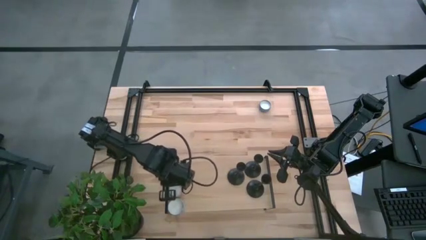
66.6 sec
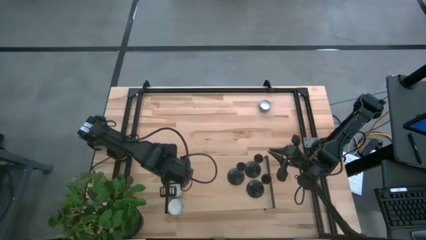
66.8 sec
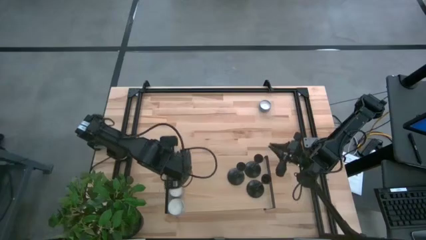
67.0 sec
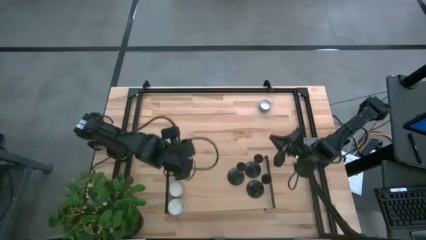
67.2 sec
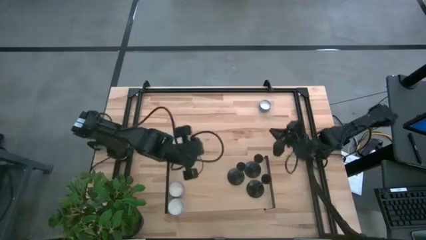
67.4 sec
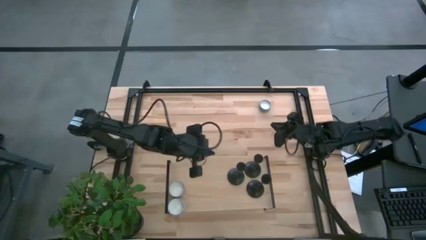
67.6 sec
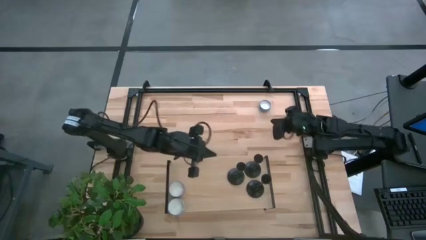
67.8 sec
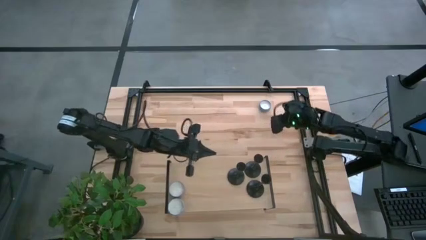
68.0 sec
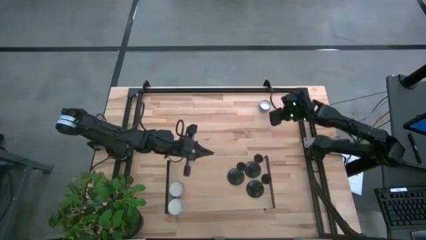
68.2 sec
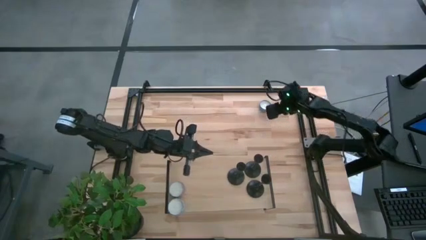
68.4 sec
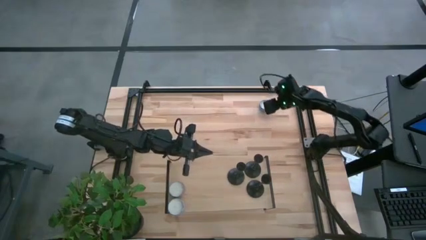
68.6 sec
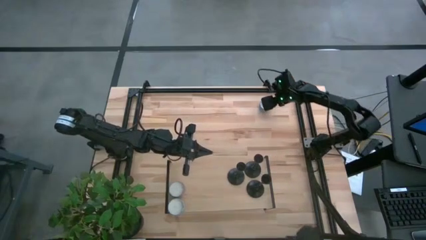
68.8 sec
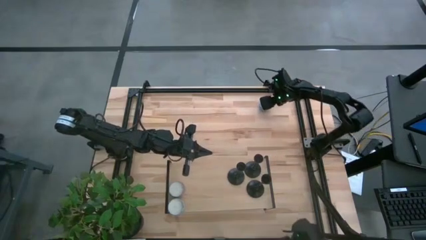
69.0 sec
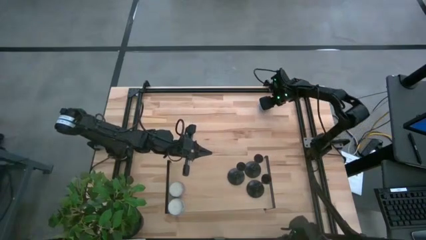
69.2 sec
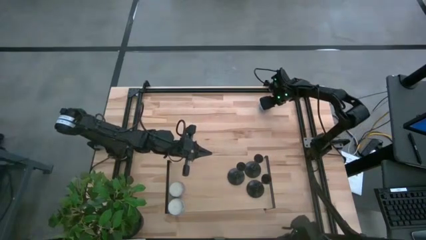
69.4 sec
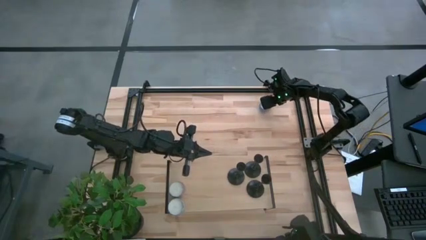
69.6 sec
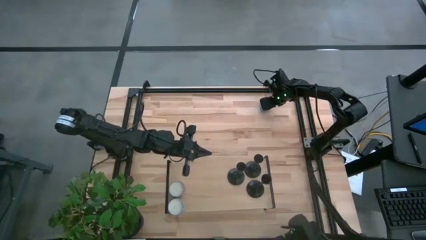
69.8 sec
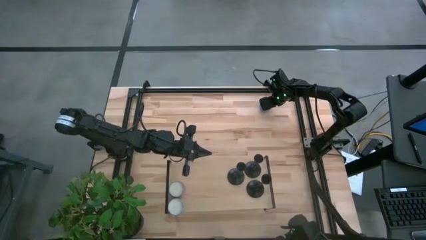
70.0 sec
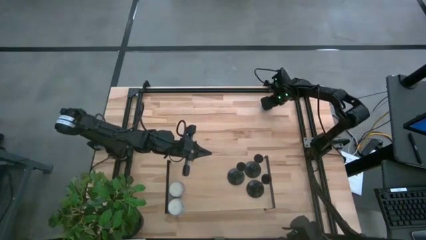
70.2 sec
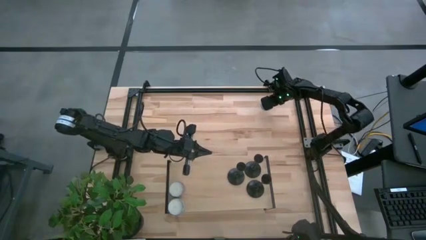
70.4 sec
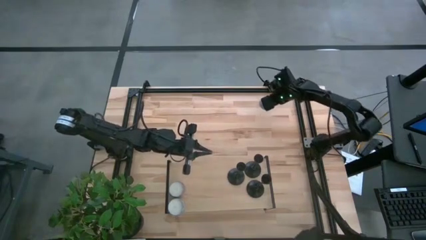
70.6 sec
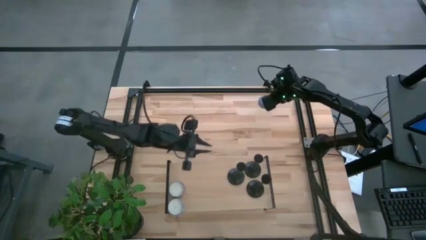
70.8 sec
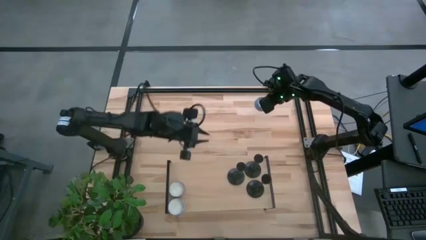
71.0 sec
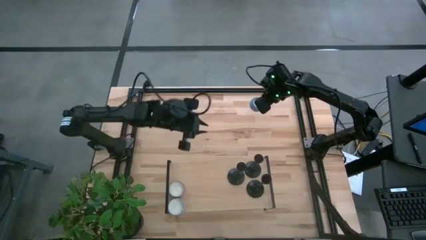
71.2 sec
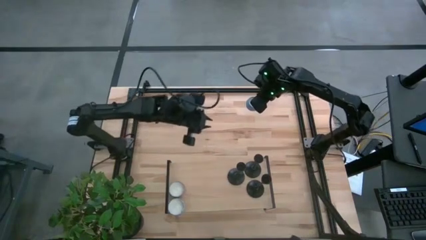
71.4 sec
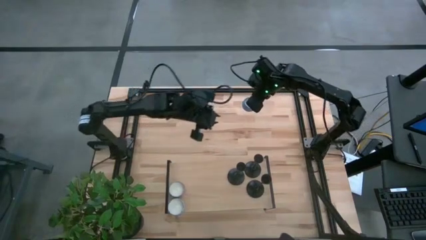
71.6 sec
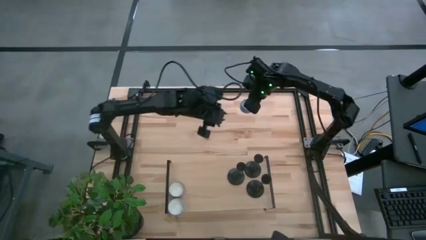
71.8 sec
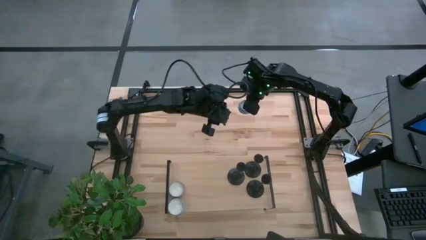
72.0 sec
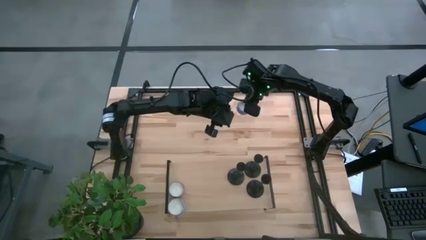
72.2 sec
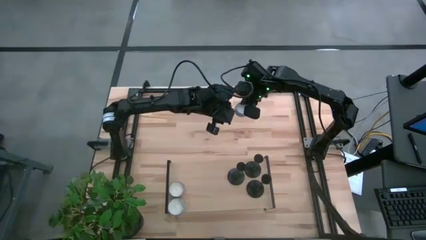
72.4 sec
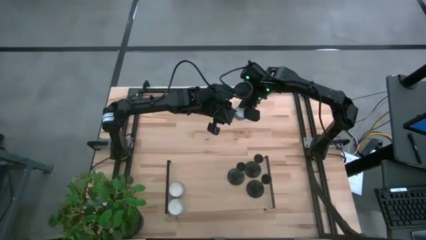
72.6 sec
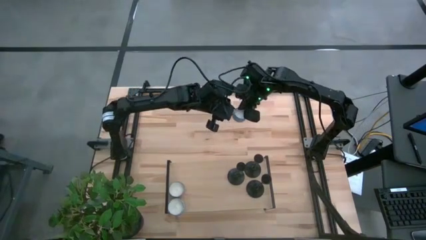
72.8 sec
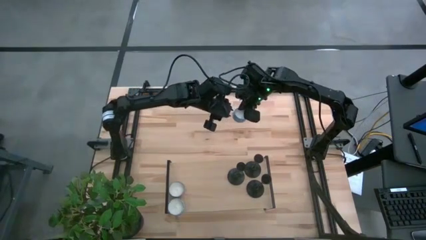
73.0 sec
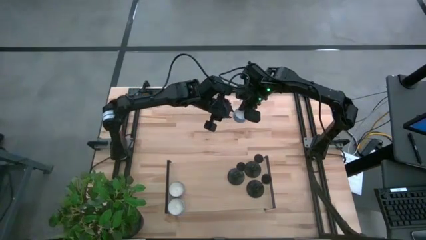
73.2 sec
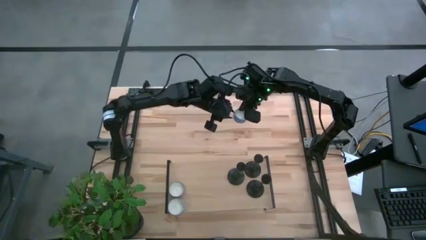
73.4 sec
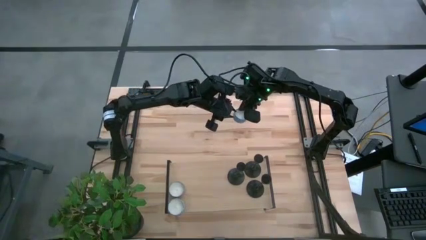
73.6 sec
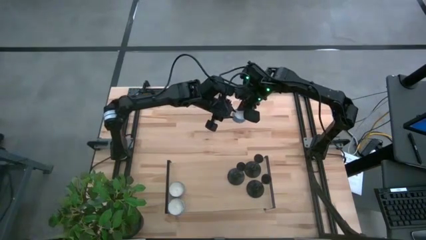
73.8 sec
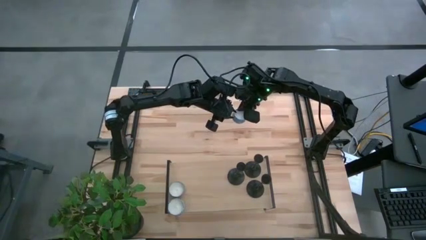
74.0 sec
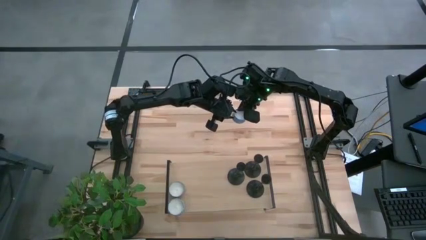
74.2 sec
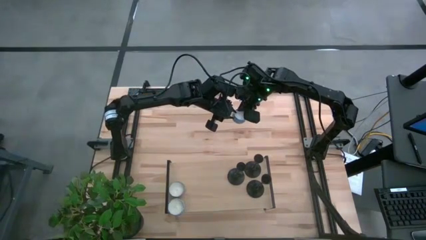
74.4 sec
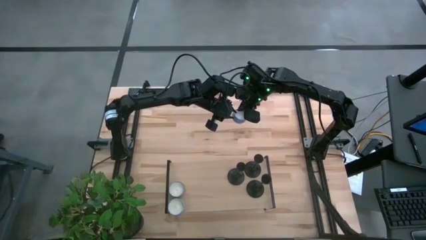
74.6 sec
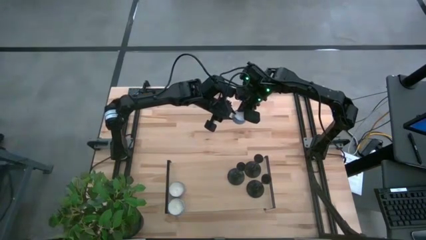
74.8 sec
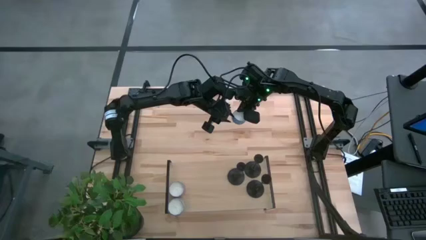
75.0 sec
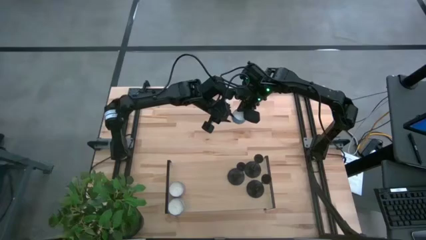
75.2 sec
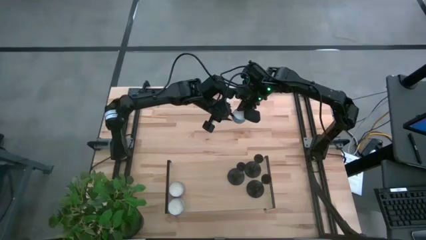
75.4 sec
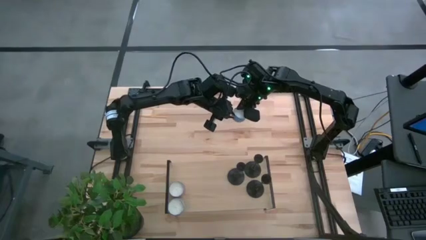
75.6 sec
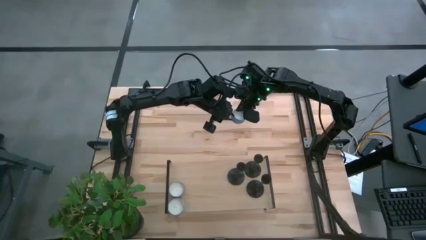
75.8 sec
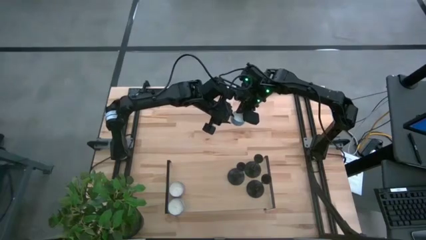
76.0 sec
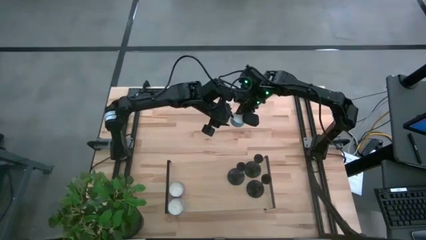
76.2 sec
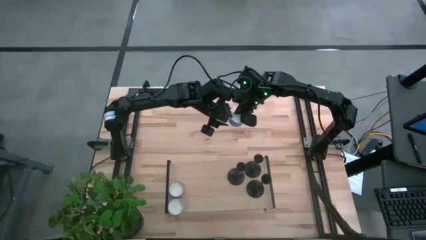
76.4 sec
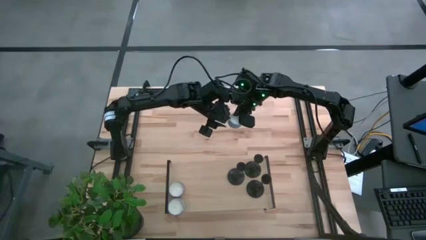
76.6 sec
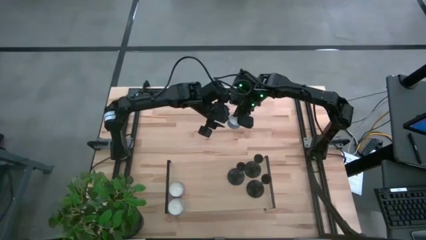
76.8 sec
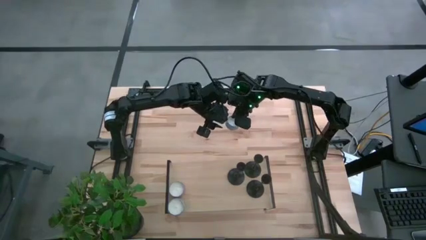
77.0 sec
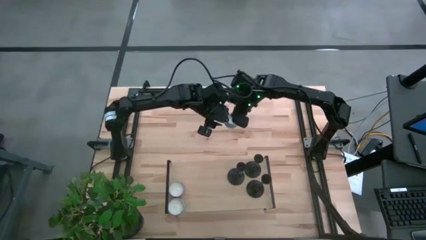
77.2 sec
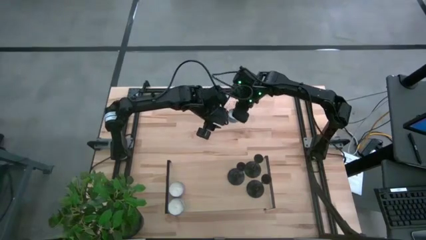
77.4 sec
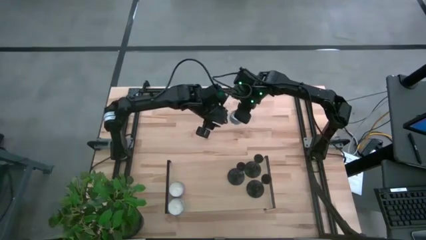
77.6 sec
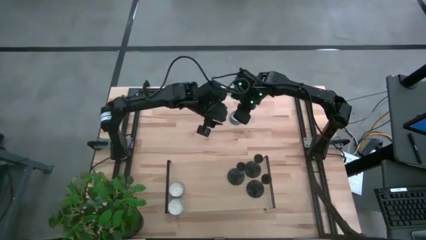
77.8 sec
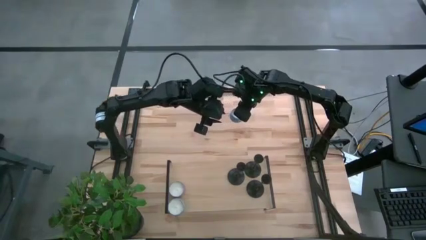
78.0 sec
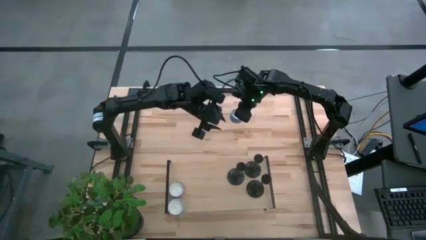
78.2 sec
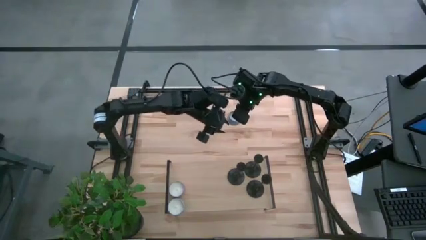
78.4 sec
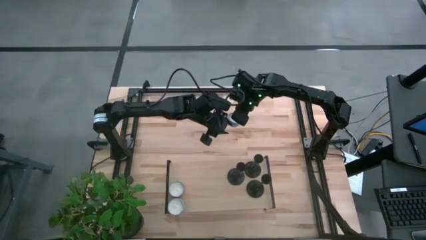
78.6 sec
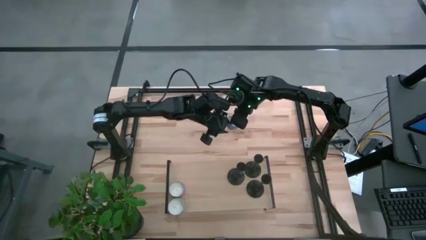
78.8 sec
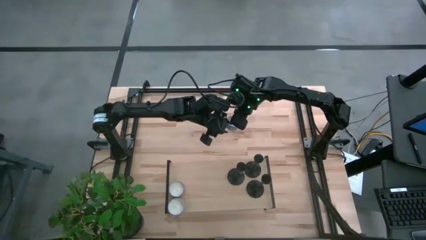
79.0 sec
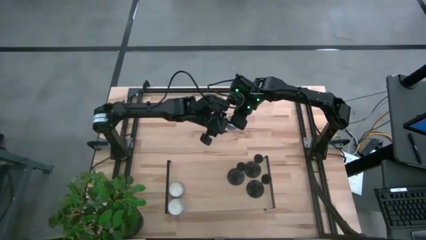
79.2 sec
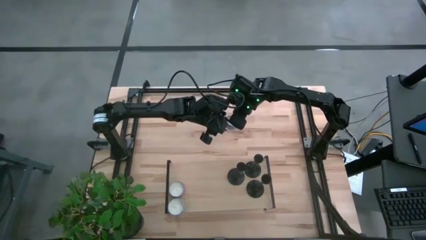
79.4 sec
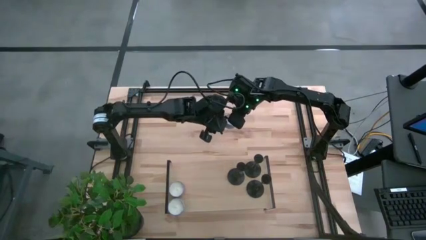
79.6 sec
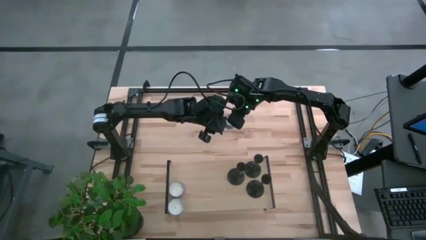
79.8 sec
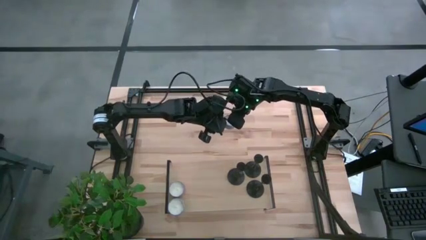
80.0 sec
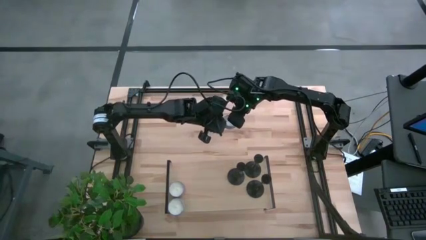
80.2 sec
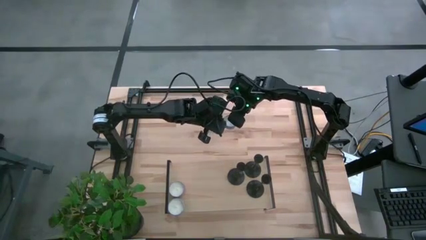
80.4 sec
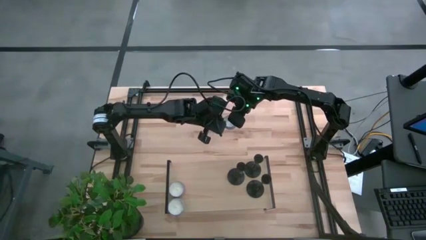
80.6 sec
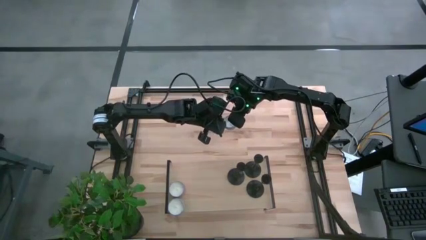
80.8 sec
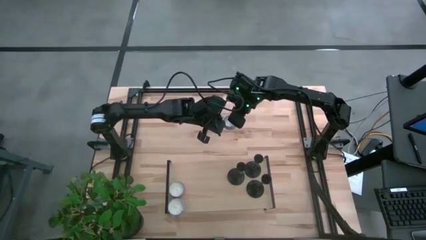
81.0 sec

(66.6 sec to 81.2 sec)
Task: Pick & Place candle stick holders
Put the scented candle on the shelf

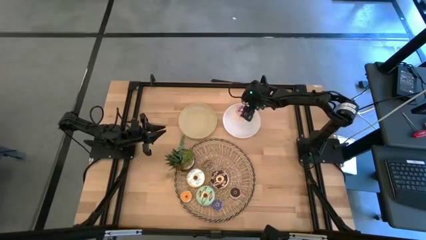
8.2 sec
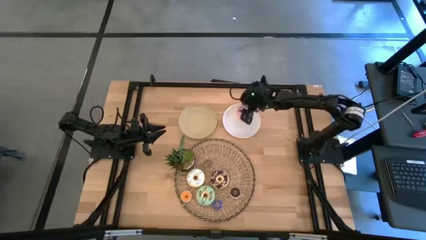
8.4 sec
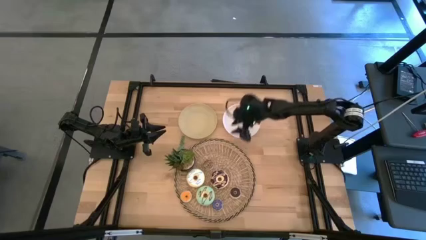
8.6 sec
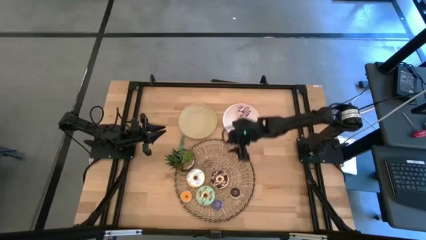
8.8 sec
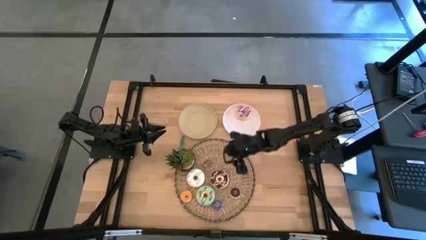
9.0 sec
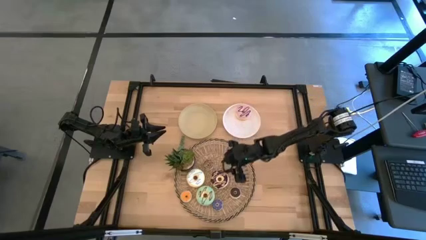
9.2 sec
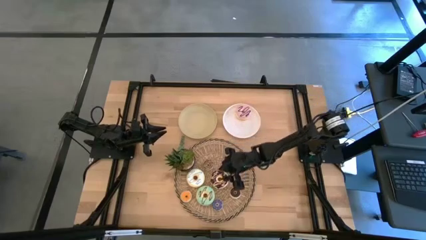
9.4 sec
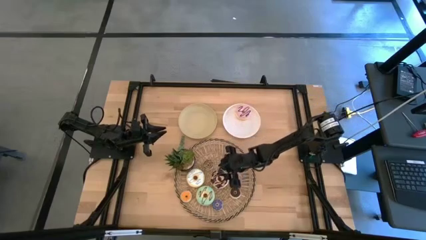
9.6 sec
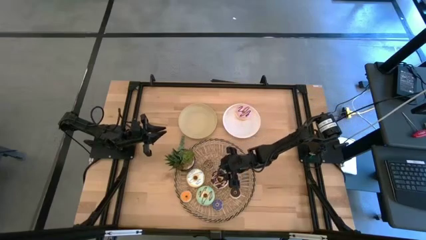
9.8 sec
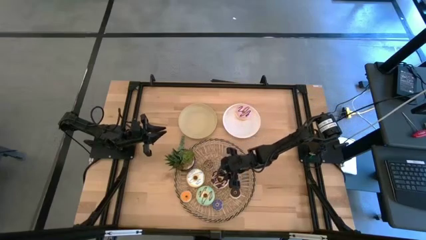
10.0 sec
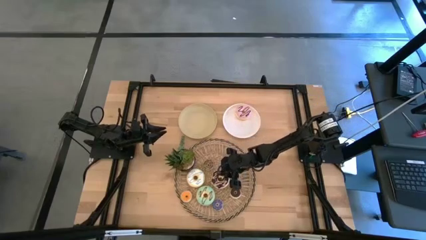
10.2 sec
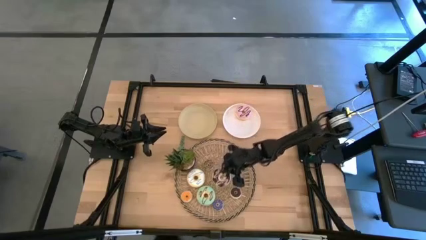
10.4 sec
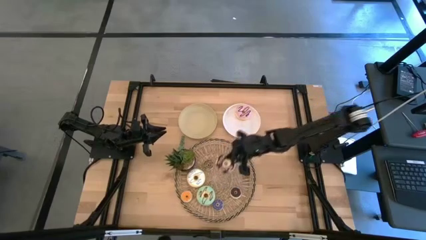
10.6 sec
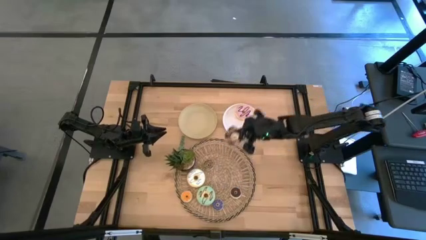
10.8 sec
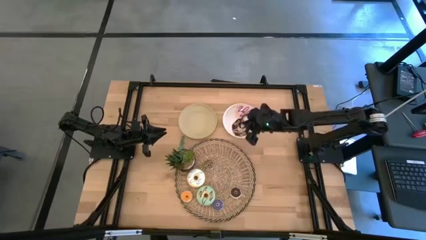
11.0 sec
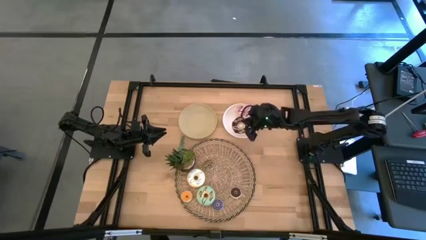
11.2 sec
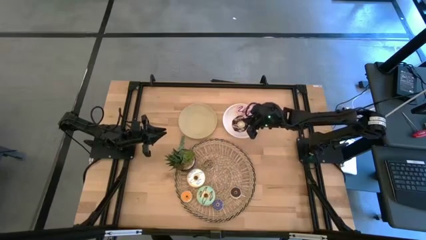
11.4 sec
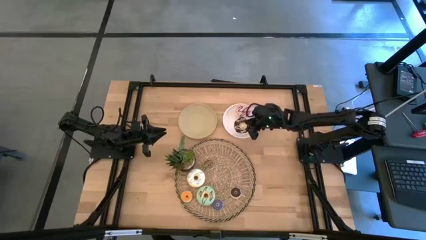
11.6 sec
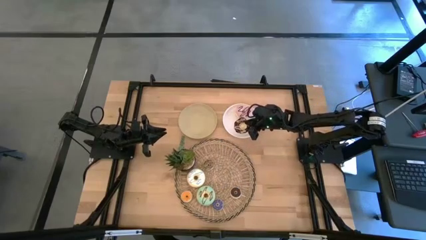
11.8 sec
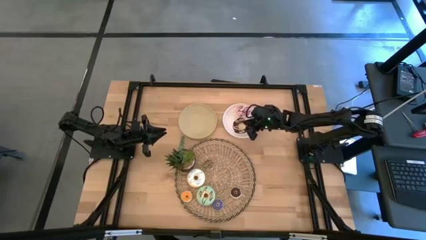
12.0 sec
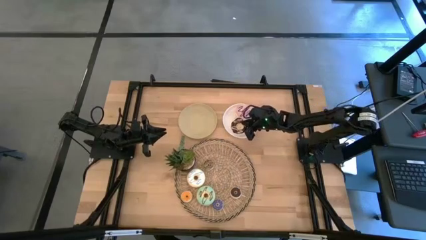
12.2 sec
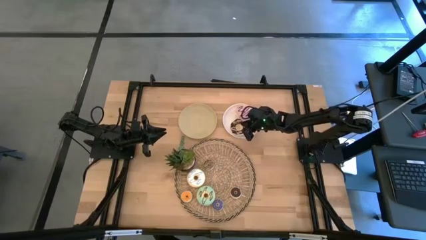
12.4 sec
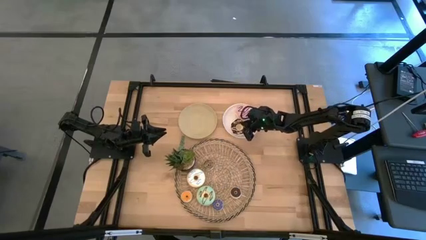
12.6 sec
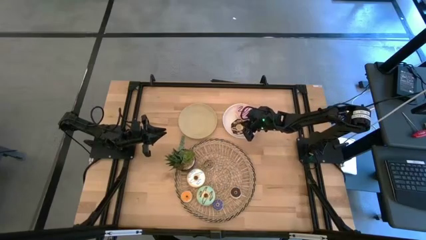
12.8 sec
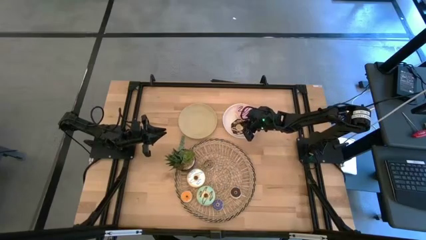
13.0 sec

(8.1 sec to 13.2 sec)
Task: Pick & Place donuts
Put the large black donut on the white plate
